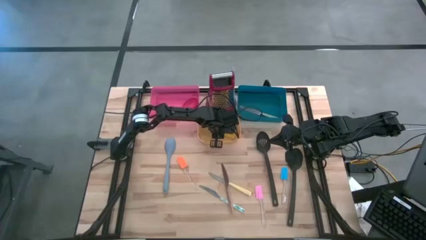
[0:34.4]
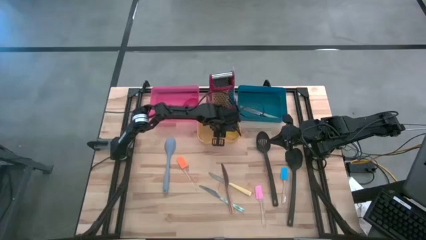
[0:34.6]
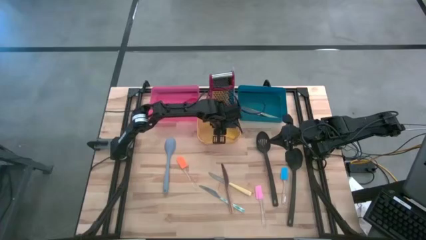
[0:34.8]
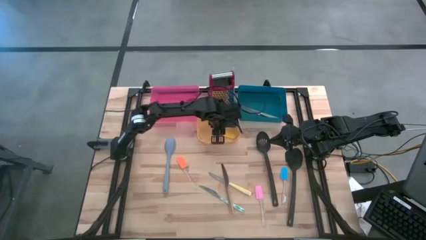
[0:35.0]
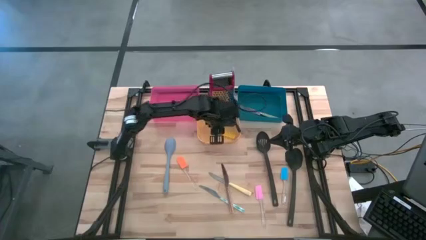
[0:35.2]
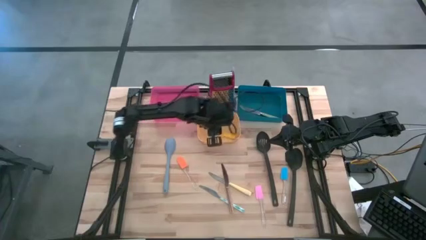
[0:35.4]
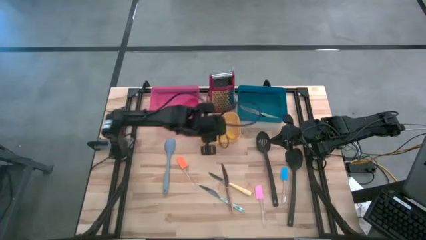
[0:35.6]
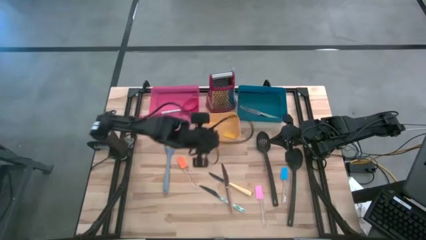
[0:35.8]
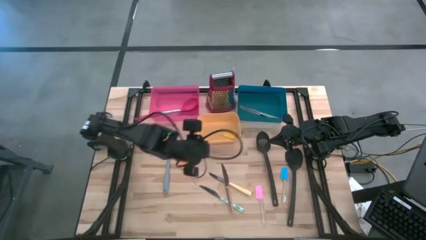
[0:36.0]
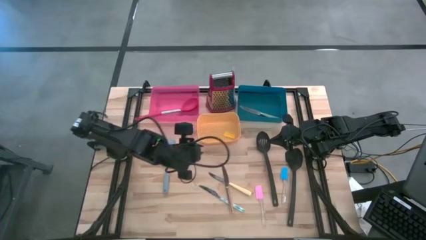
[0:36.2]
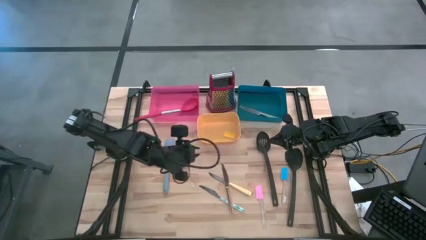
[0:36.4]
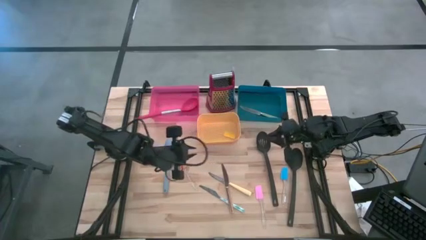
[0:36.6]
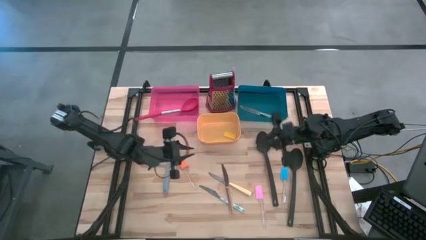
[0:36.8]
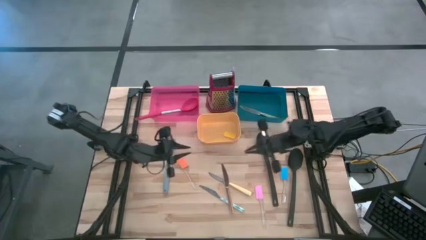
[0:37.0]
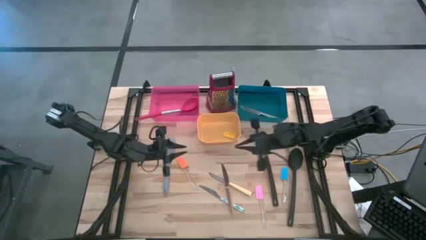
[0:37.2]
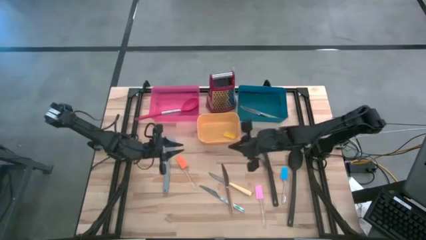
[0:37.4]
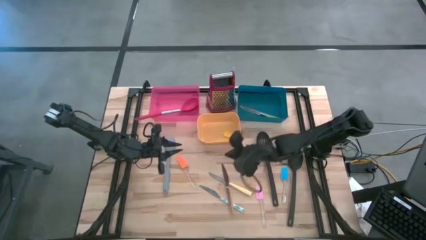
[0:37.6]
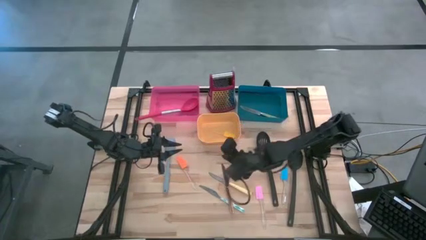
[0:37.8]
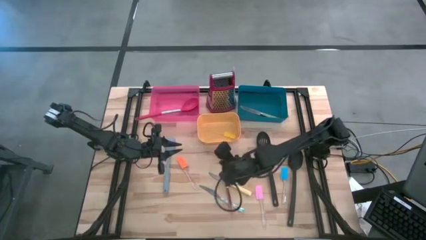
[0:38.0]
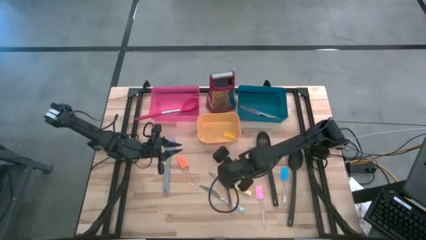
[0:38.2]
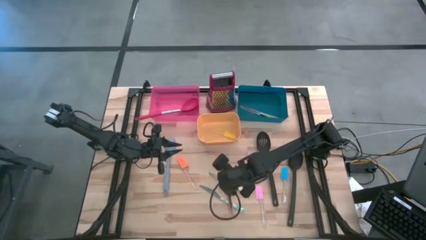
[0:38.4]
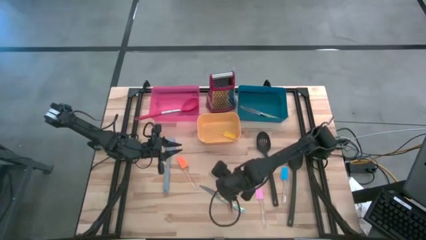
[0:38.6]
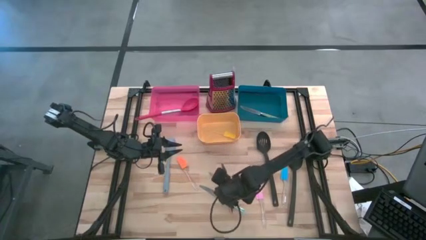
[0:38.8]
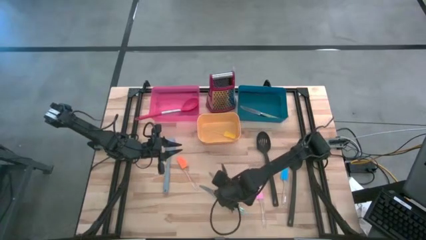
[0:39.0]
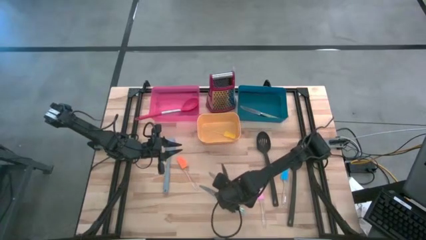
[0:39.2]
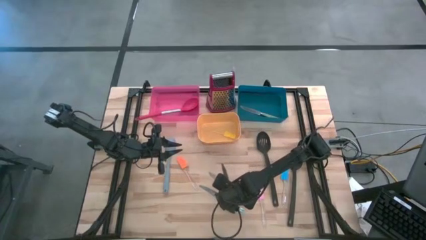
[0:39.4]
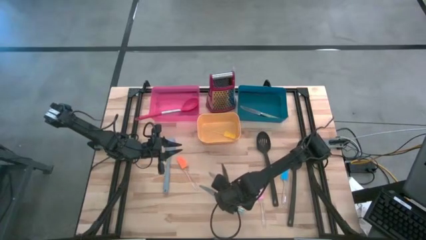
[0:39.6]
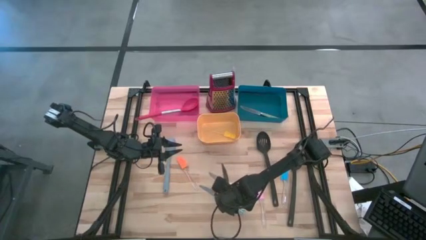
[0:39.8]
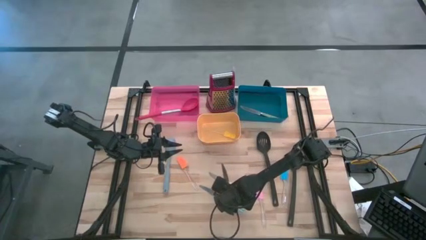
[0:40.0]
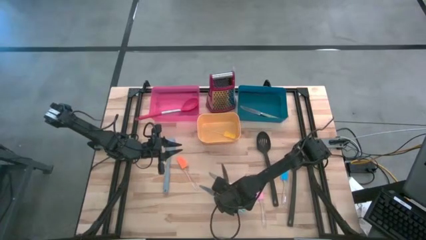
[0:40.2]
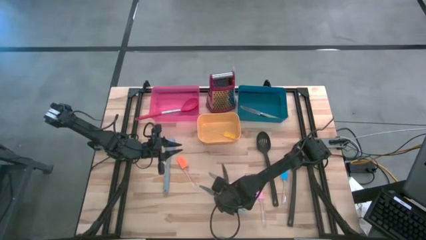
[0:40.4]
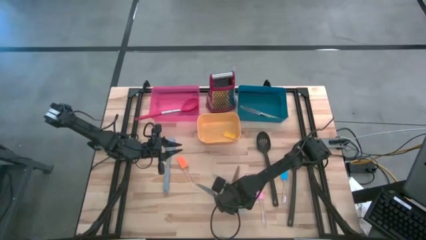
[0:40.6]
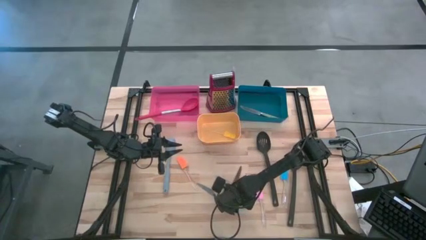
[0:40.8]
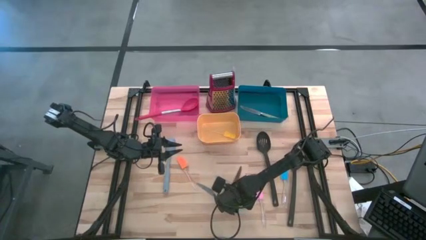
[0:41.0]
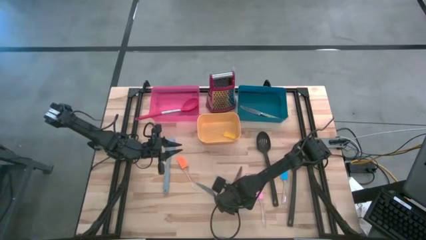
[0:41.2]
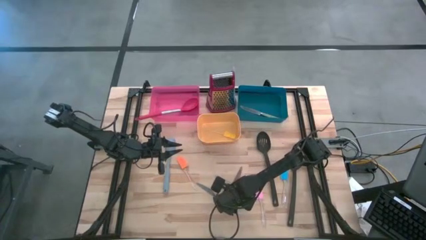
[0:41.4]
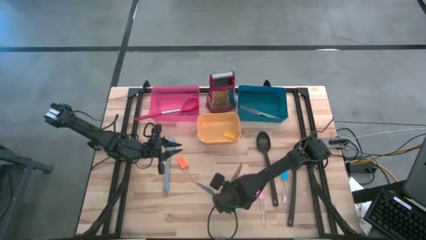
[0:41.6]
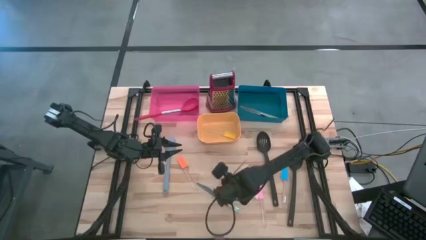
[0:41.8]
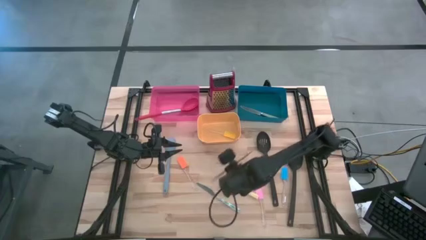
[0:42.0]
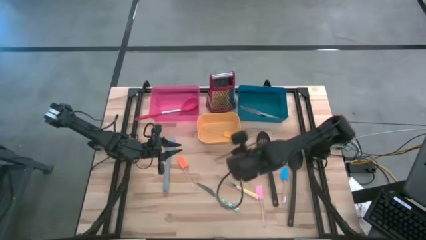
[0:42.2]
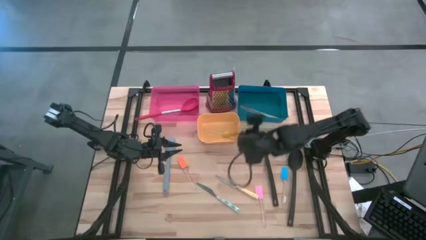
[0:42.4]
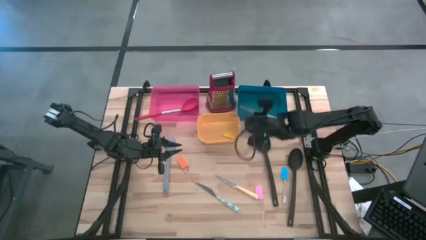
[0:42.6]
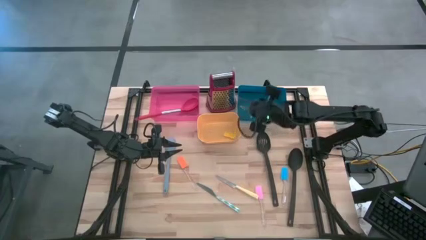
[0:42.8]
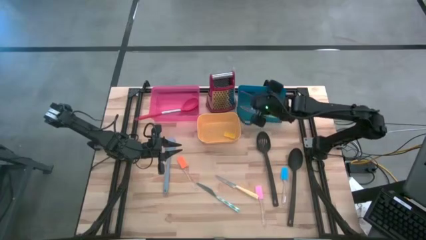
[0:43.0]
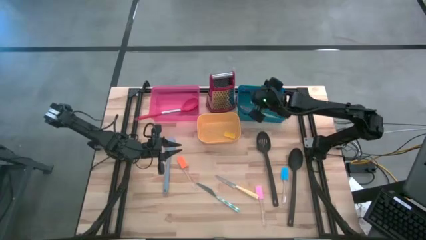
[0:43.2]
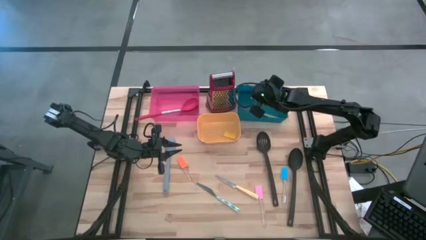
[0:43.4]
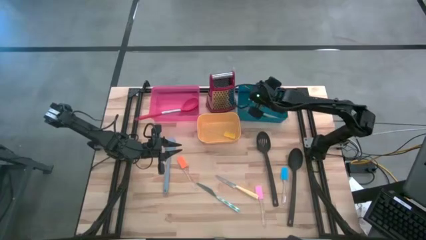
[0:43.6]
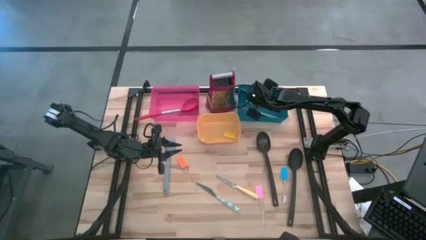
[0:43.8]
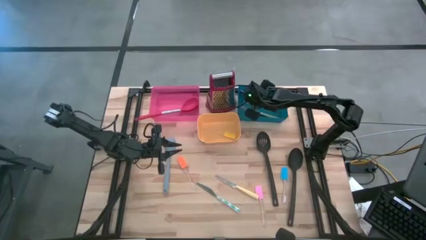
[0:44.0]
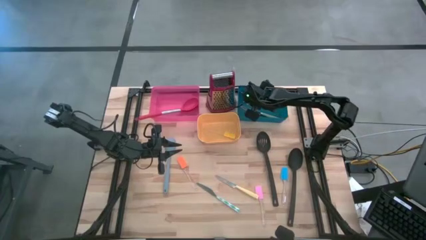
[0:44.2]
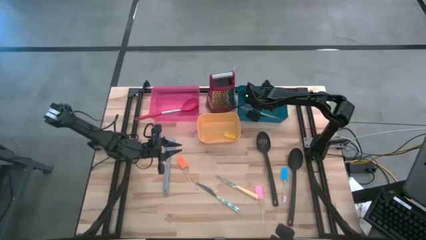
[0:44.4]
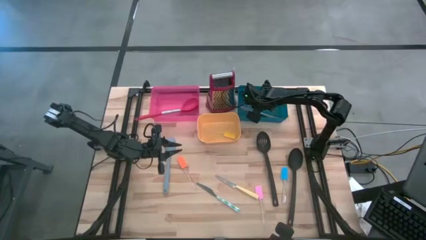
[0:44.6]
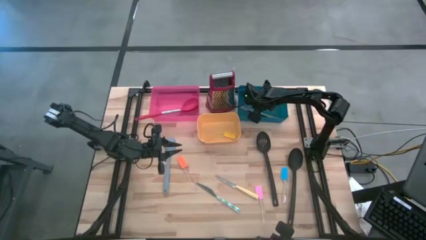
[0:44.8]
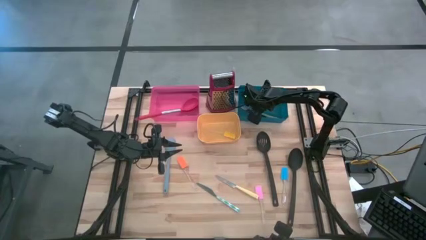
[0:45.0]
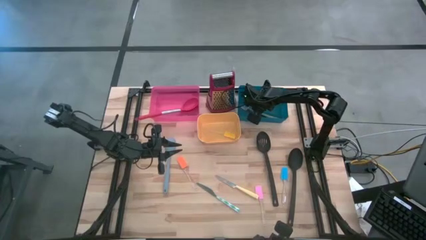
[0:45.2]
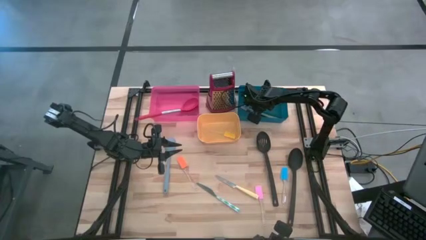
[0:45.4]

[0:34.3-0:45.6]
Task: Pick & Place Kitchen Items
Put the brown table knife into the blue bin

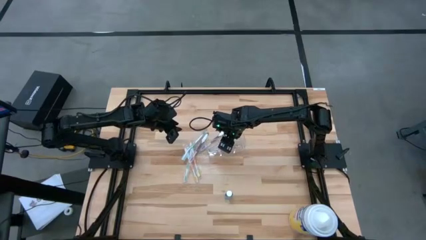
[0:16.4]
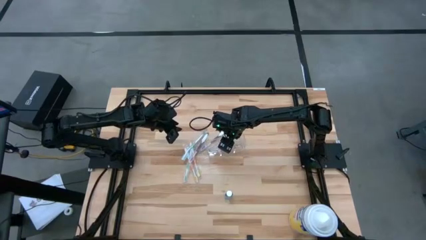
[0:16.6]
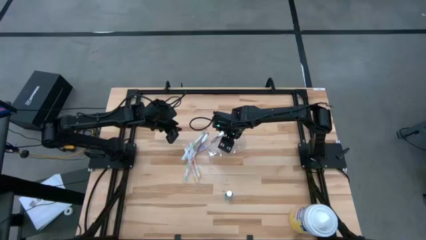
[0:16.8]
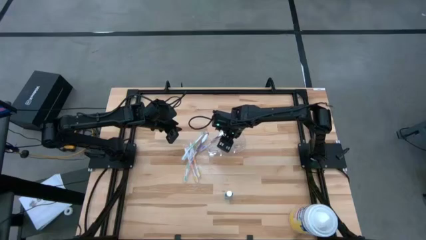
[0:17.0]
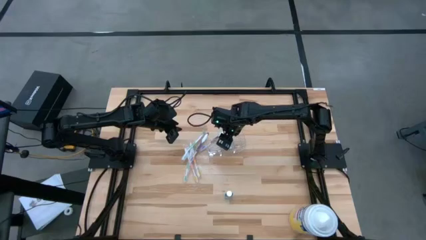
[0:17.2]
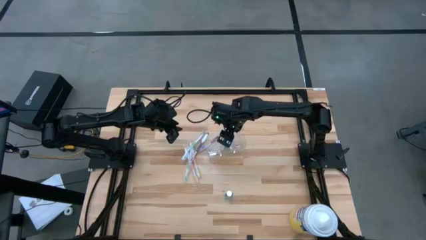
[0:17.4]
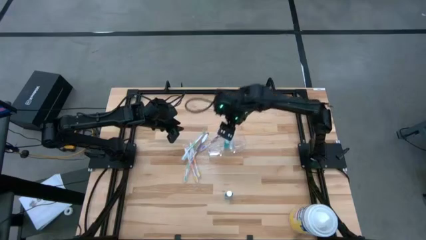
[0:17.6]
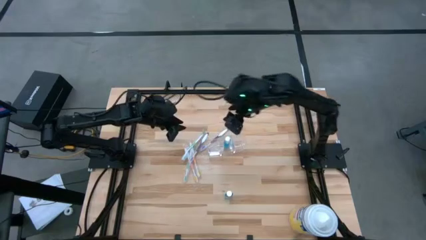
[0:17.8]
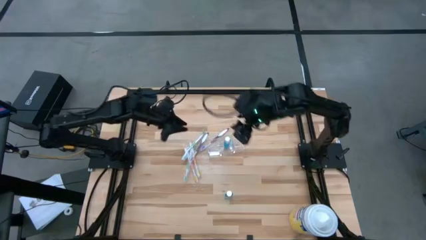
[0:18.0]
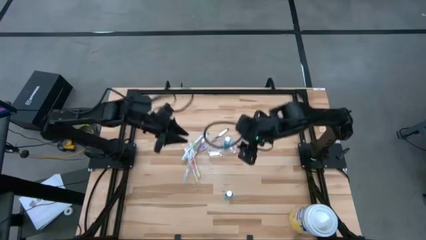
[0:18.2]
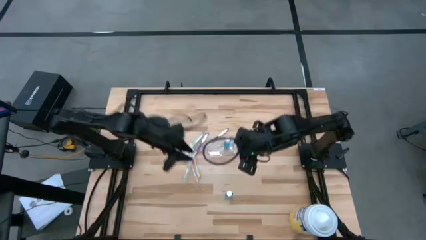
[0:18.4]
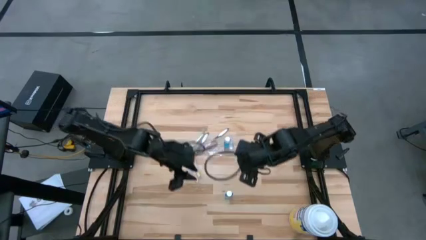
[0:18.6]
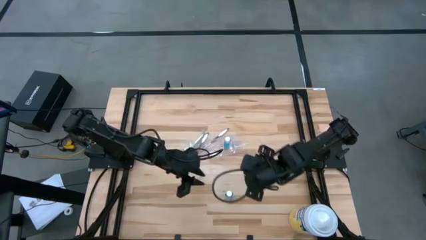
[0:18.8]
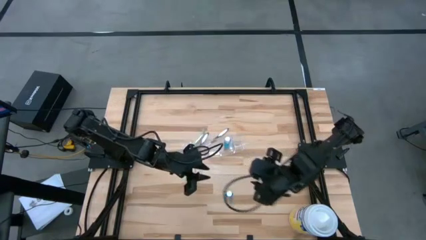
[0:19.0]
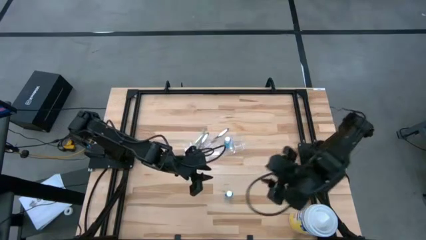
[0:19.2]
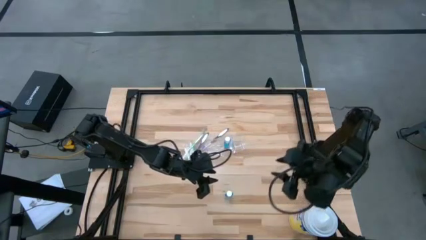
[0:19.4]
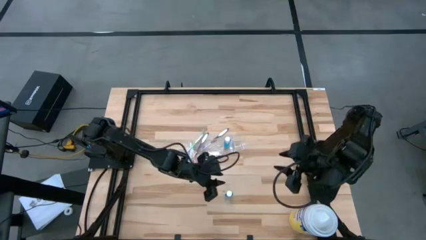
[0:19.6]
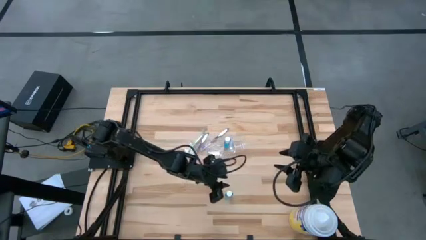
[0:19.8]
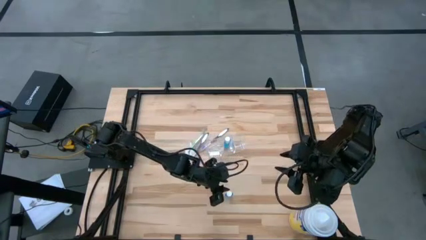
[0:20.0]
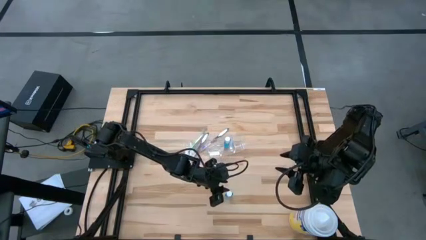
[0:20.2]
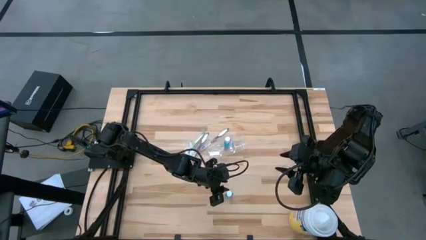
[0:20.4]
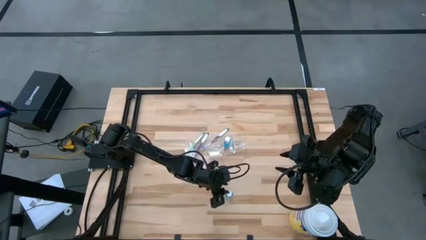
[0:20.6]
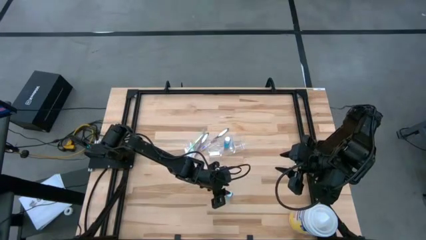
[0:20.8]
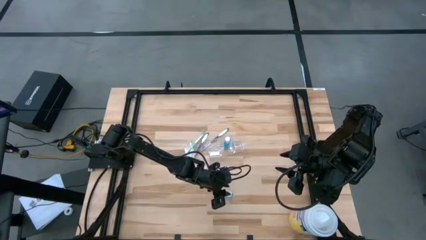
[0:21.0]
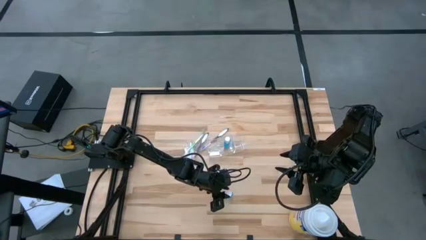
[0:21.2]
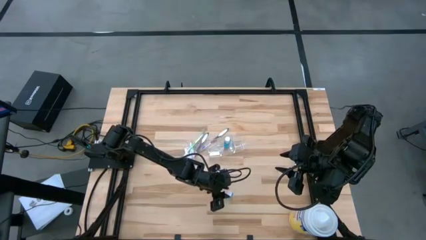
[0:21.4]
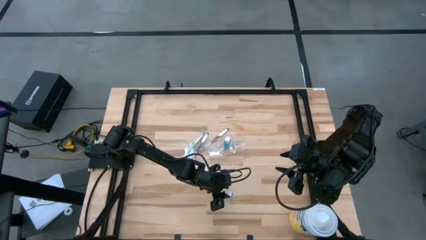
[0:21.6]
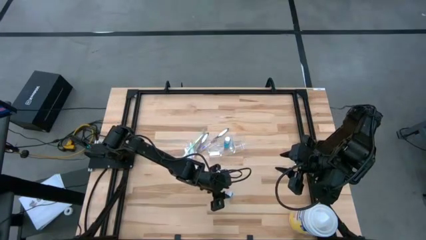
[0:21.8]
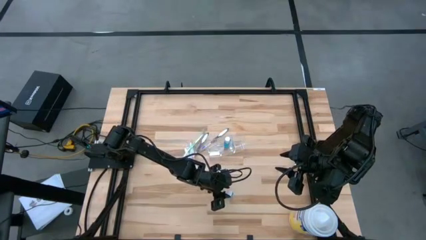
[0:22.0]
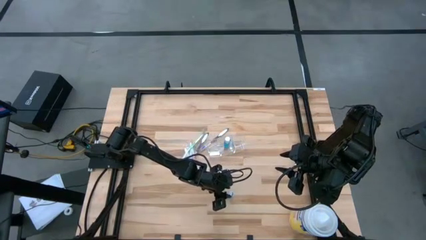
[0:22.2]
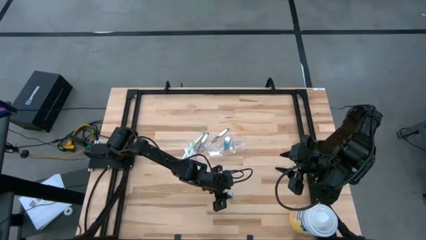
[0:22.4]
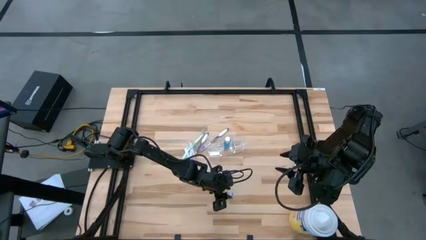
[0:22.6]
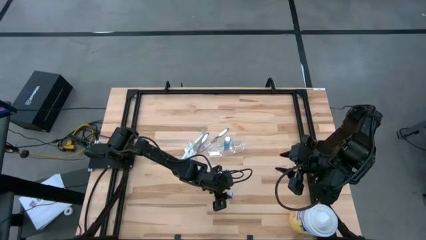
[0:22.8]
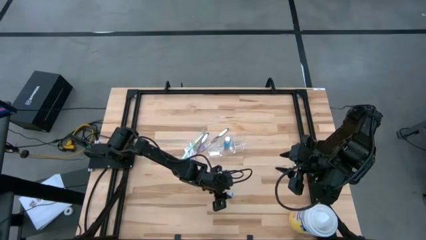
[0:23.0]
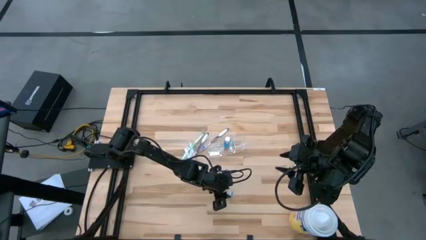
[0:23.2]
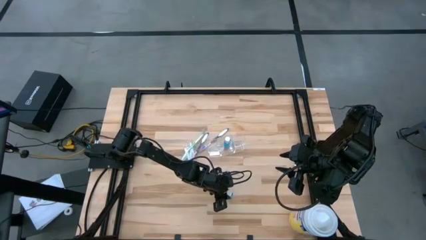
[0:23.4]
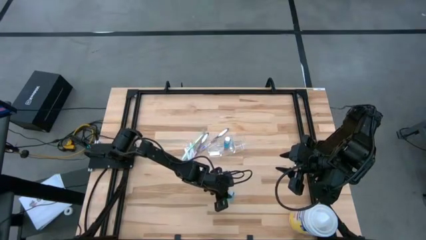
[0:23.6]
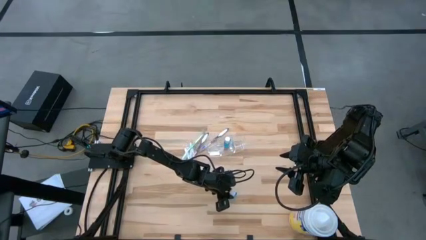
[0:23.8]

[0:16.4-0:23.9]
Task: Pick & Place toothbrushing station
Put the blue mouthwash bottle into the transparent organizer
